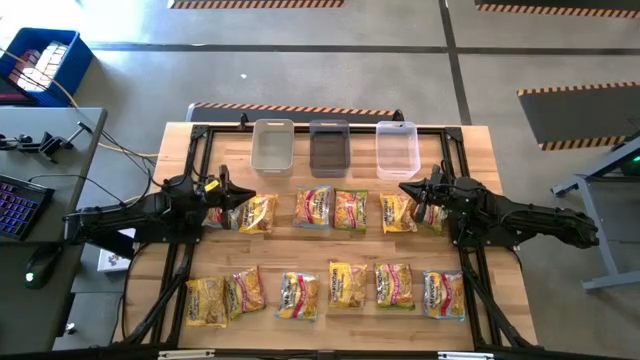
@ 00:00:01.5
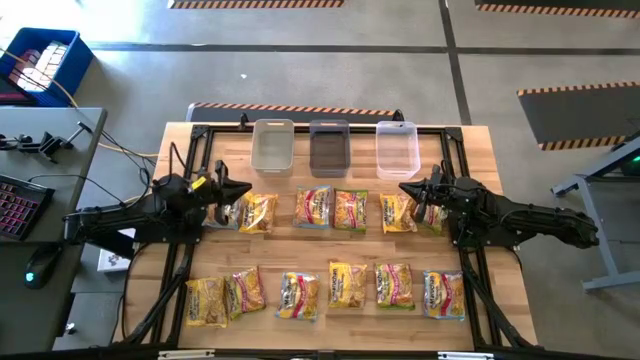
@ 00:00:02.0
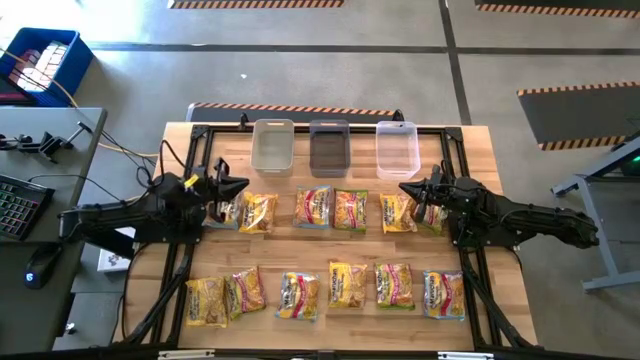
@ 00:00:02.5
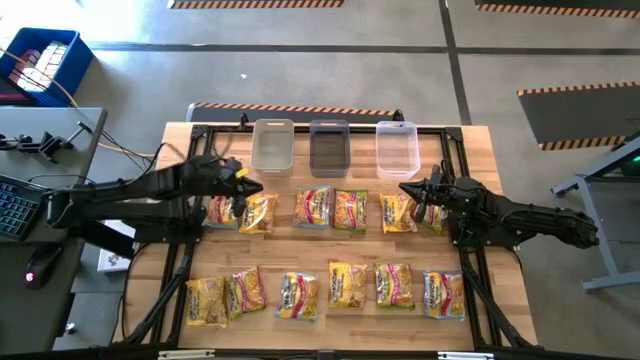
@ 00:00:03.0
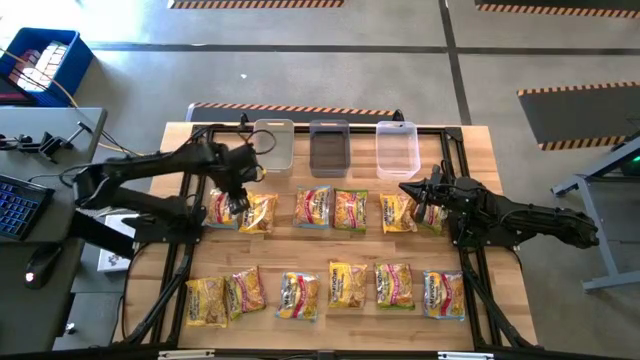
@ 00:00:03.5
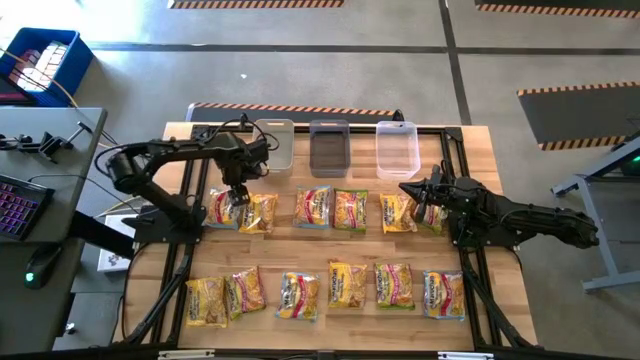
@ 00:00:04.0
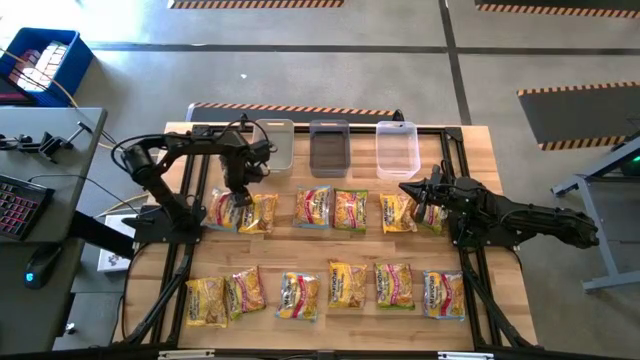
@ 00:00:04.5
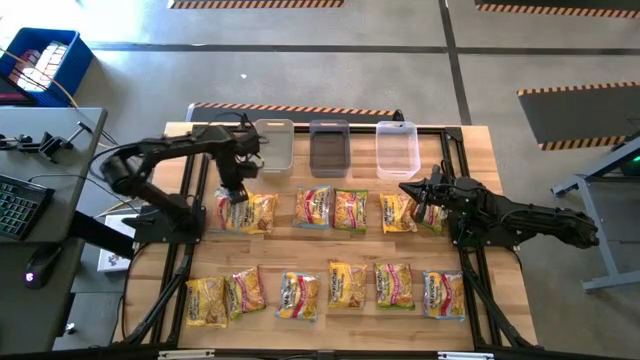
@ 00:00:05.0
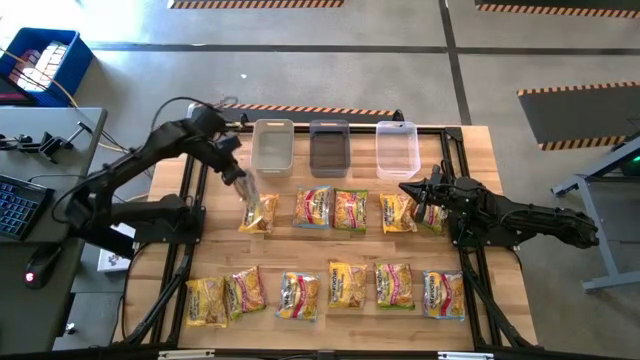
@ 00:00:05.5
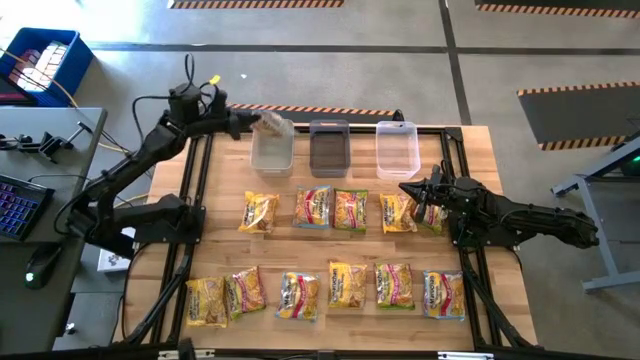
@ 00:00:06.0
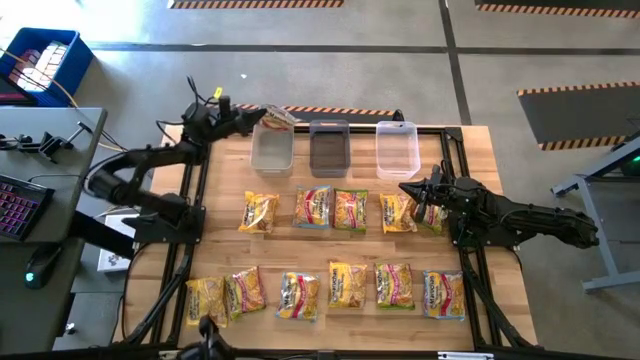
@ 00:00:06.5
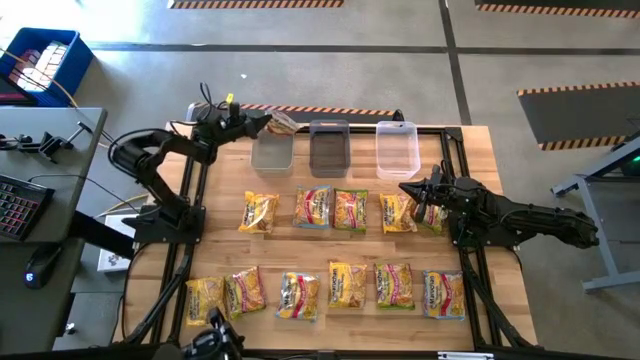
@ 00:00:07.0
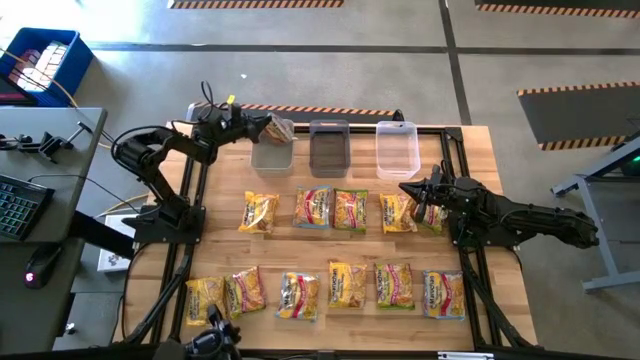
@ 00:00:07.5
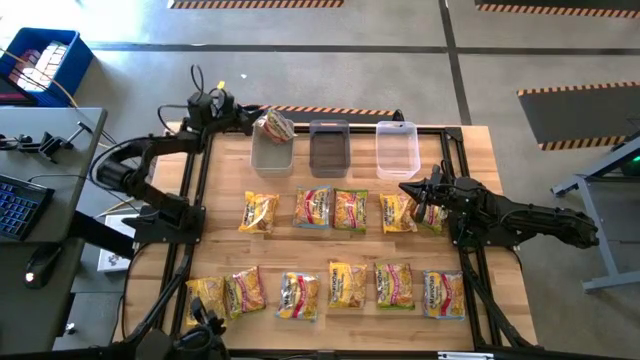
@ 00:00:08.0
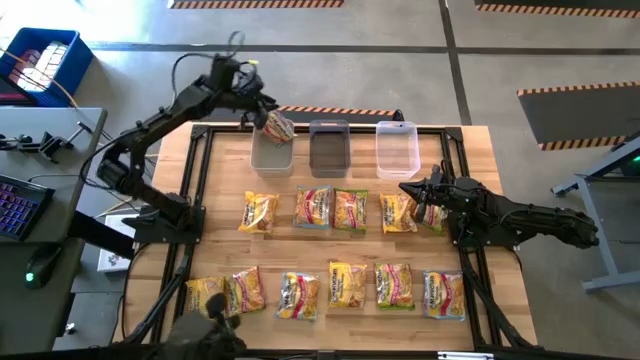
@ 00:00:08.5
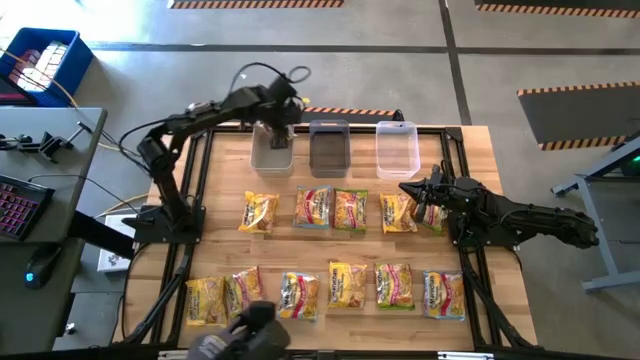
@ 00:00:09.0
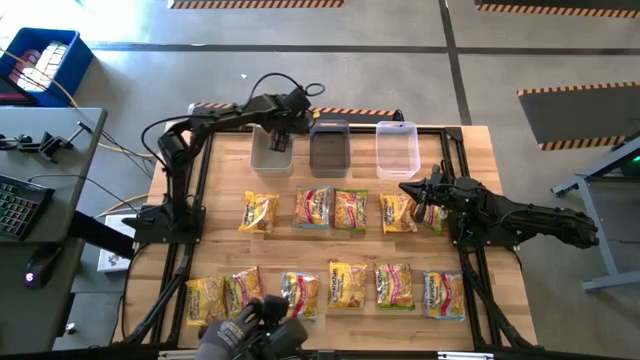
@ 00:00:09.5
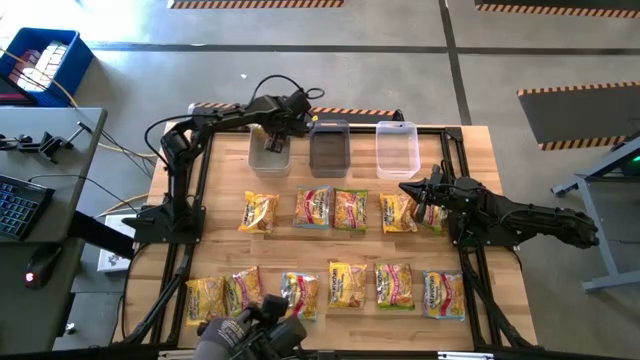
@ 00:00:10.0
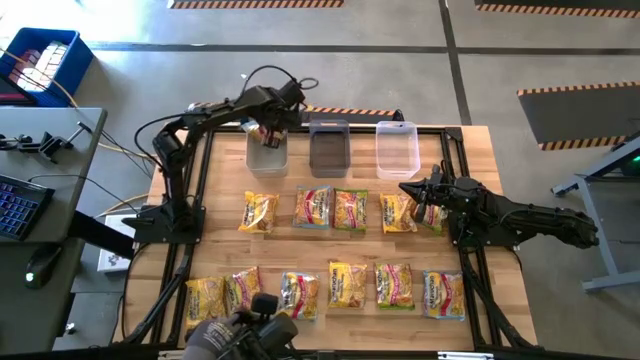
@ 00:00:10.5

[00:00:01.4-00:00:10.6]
Task: Sort Maruchan noodles
Put the blue noodle pack into the gray bin

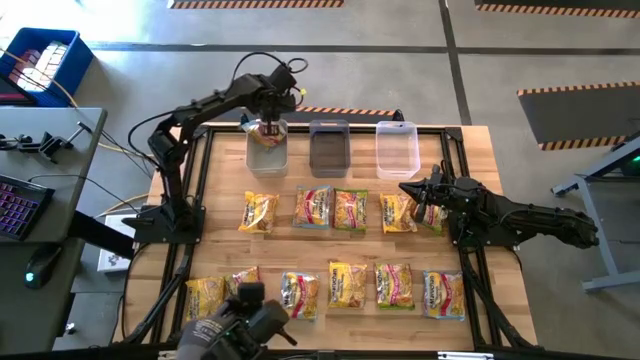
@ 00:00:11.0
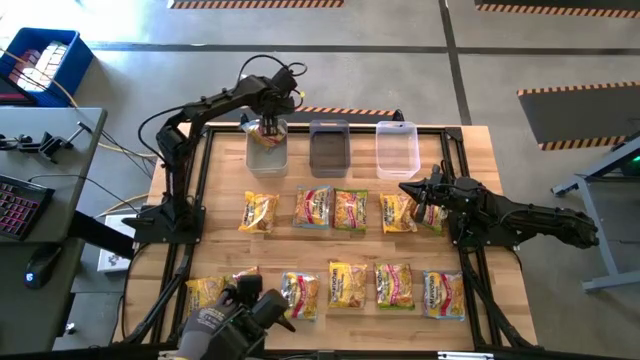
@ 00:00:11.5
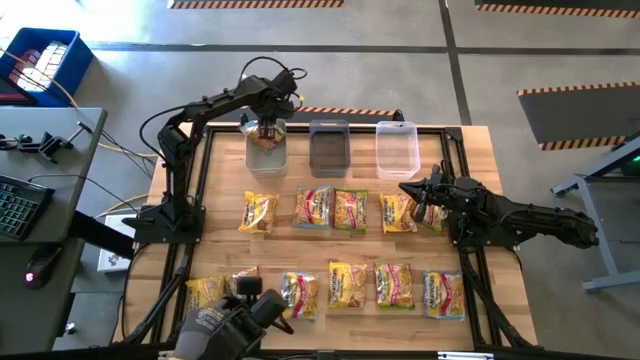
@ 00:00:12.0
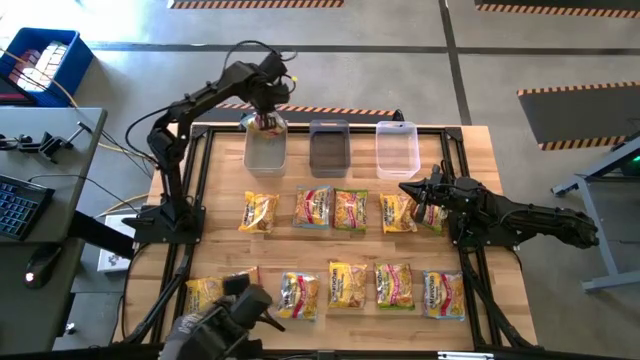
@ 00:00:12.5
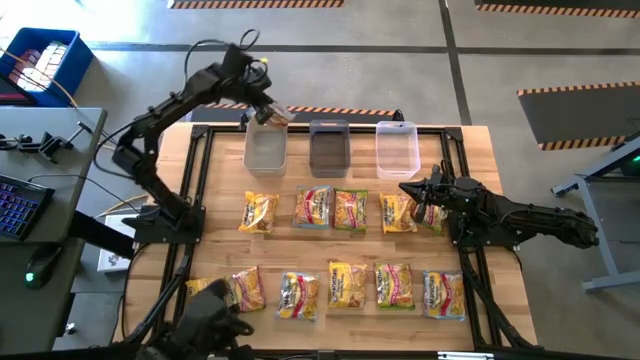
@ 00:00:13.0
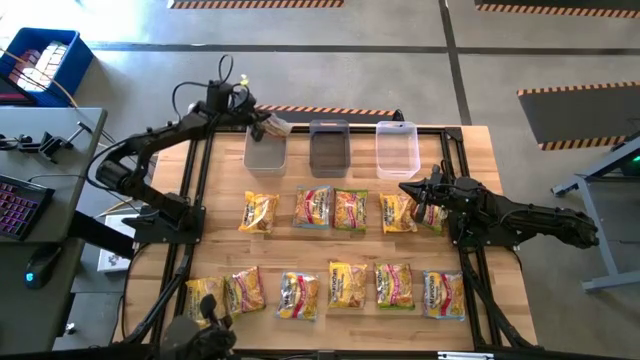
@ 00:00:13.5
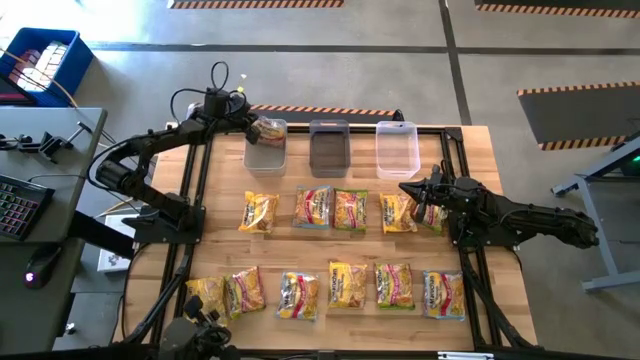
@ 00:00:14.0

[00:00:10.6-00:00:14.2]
Put the blue noodle pack into the gray bin

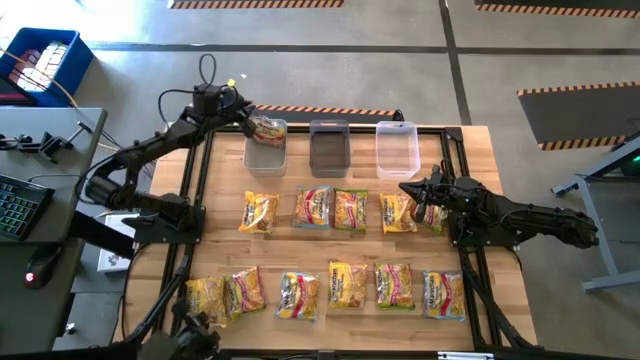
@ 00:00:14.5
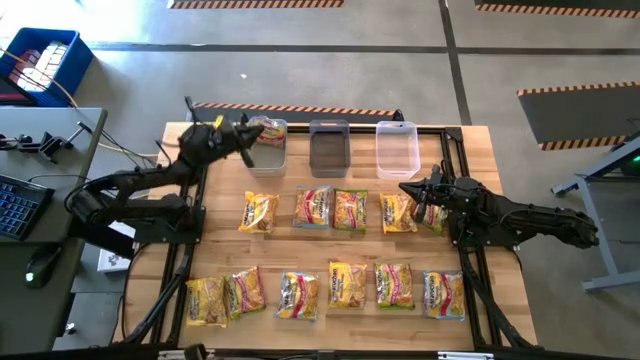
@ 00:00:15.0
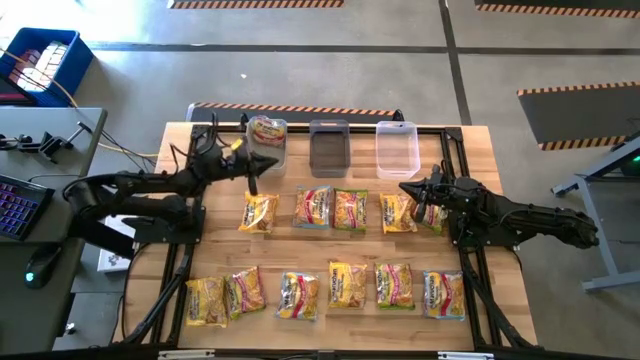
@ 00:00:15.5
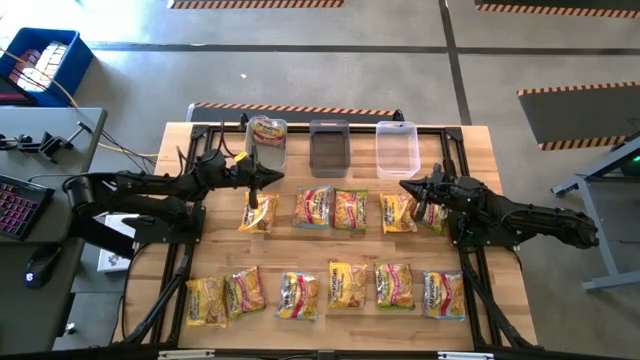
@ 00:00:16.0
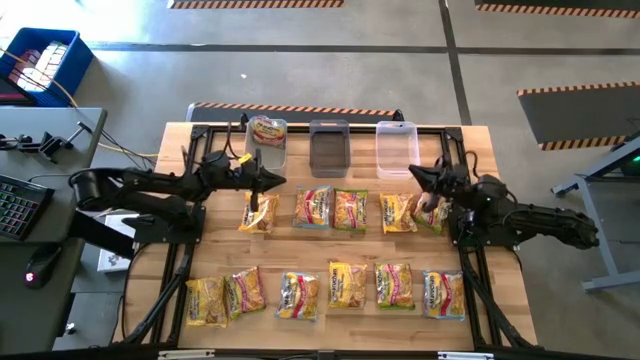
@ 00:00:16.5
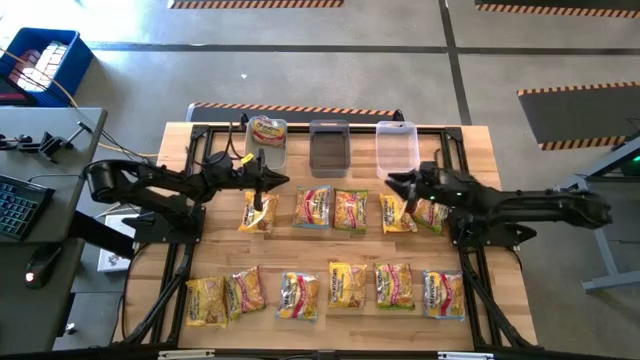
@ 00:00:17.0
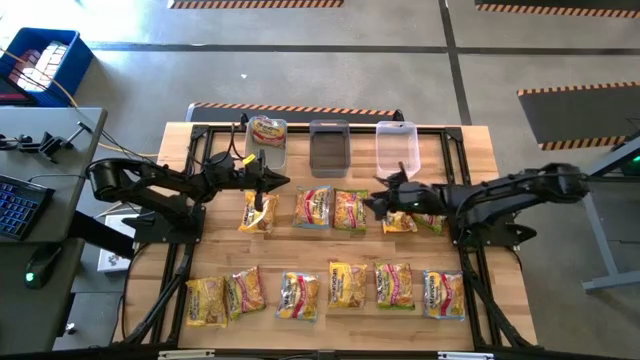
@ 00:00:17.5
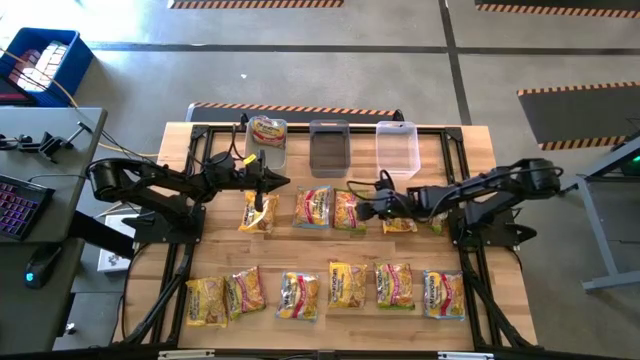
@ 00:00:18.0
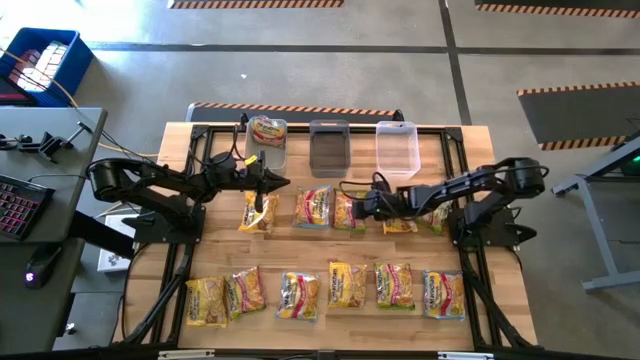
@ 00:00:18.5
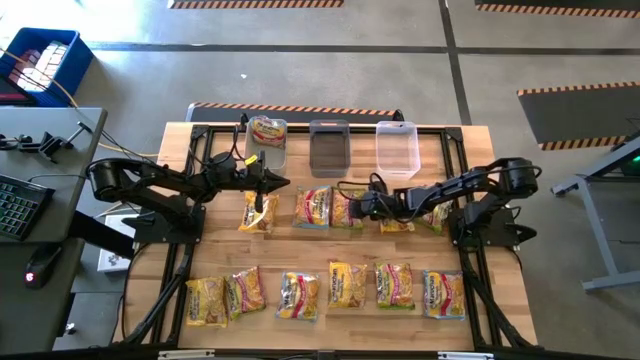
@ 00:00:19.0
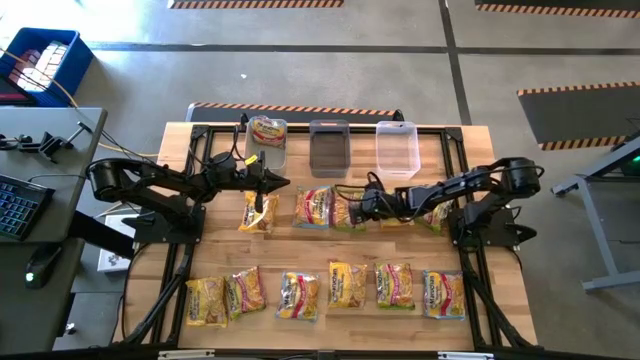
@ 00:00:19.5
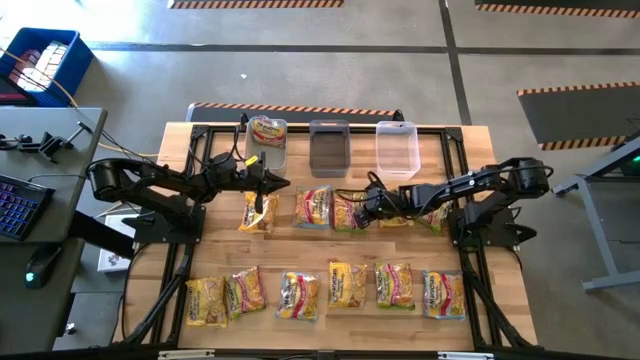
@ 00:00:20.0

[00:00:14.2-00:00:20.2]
Put the green noodle pack into the black bin

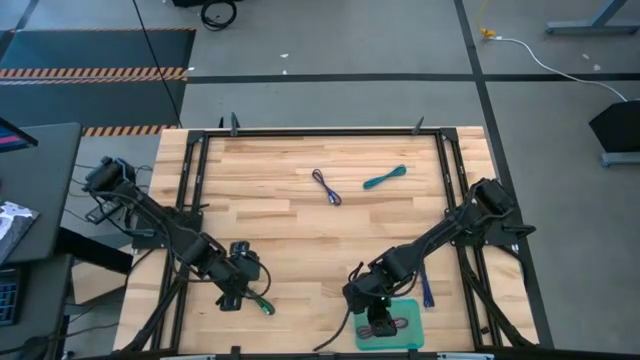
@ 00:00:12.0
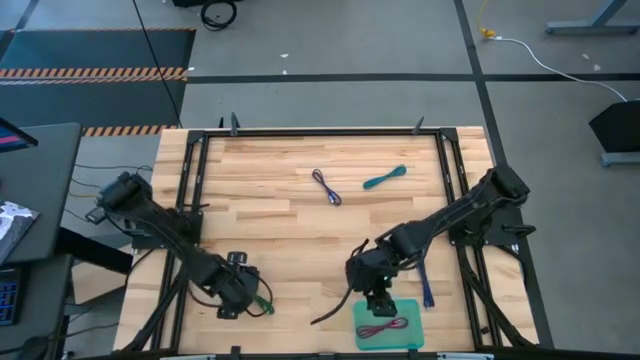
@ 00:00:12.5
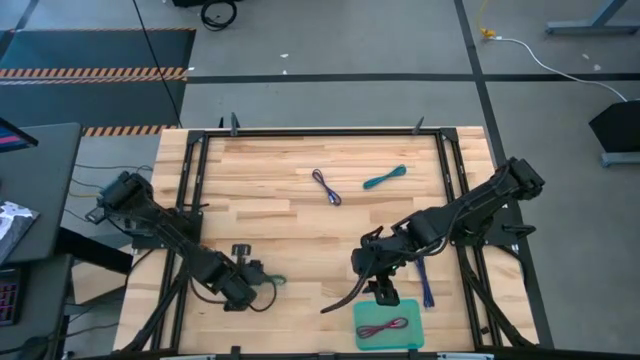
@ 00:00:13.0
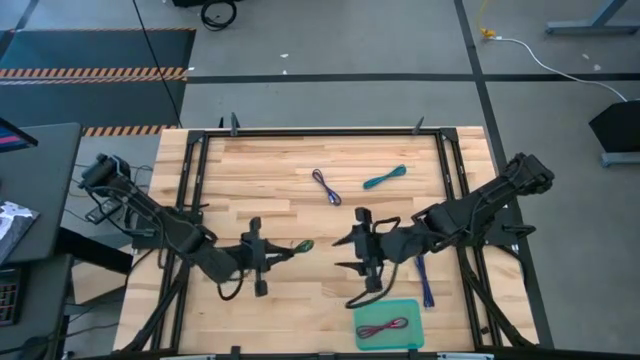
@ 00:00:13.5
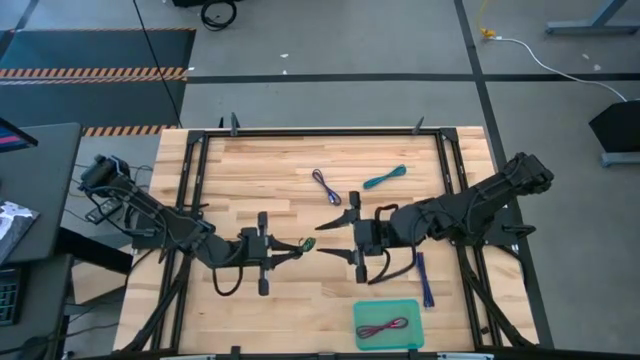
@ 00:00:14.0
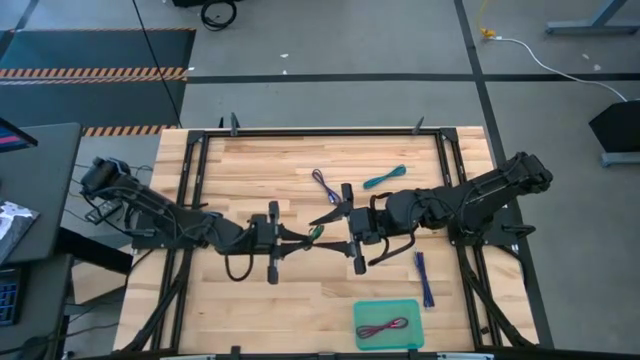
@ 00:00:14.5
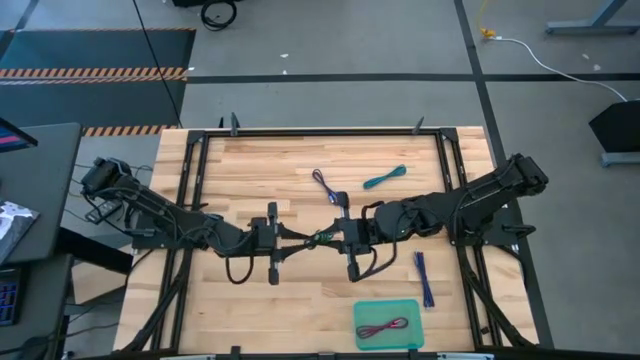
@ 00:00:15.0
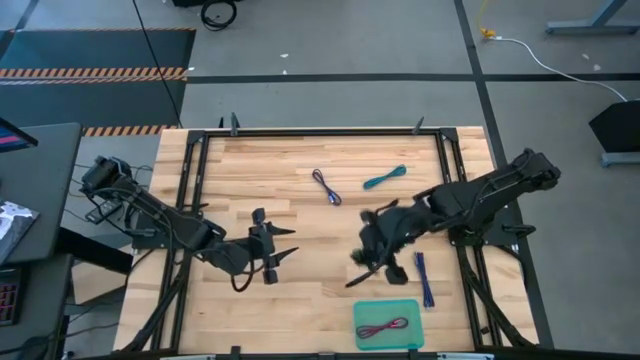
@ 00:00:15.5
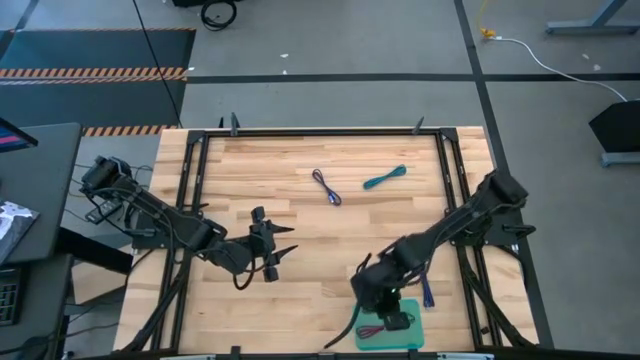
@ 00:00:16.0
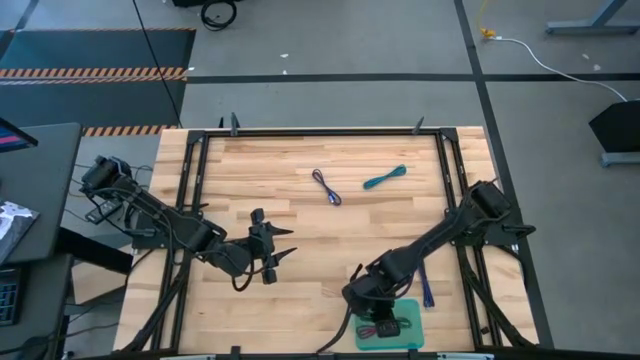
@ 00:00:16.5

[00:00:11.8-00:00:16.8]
Task: Pick and place USB-C Cables
Put the green charger cable into the blue bin
